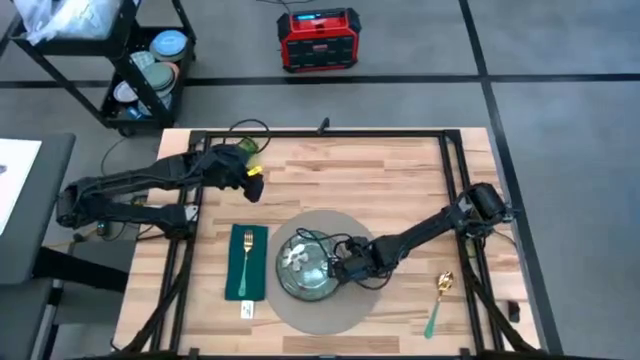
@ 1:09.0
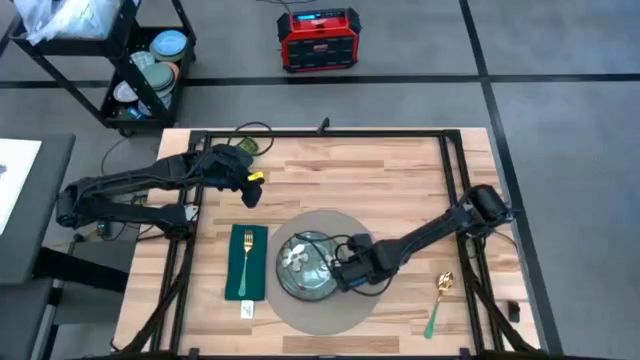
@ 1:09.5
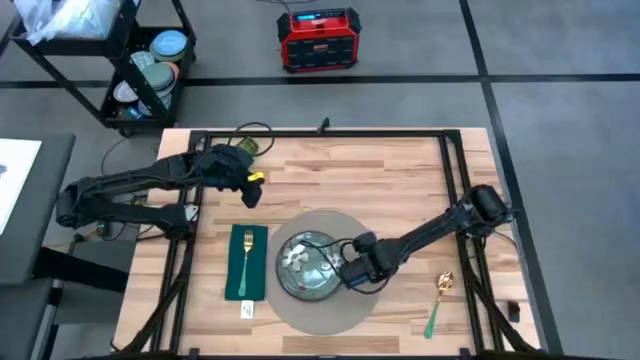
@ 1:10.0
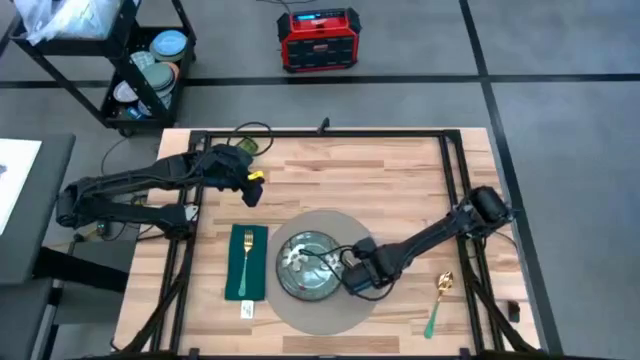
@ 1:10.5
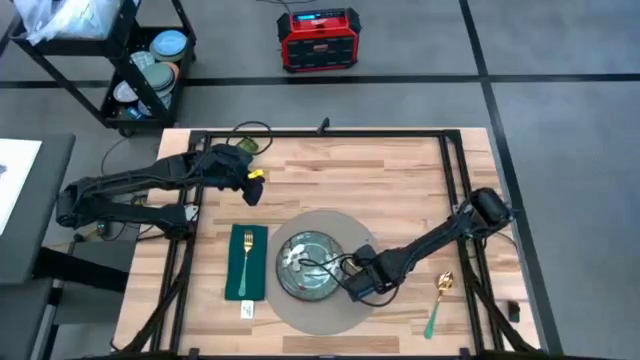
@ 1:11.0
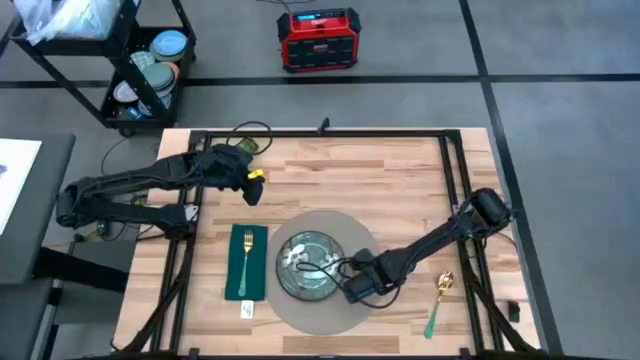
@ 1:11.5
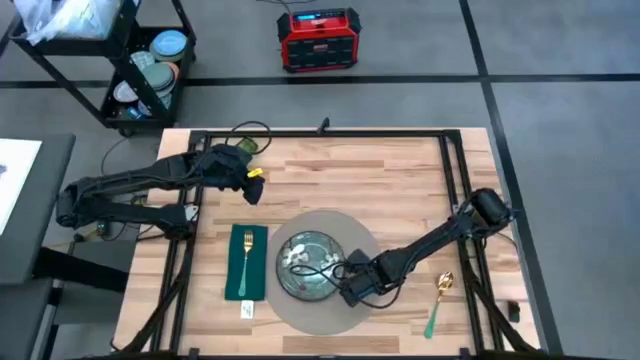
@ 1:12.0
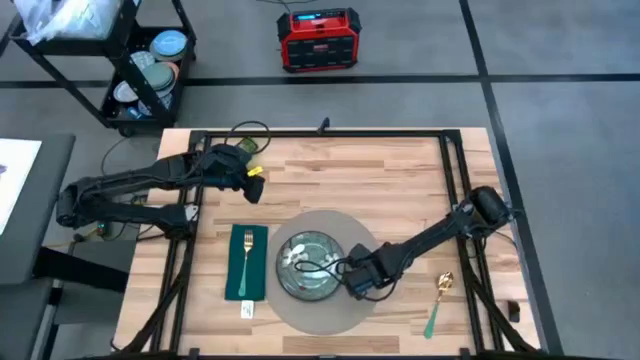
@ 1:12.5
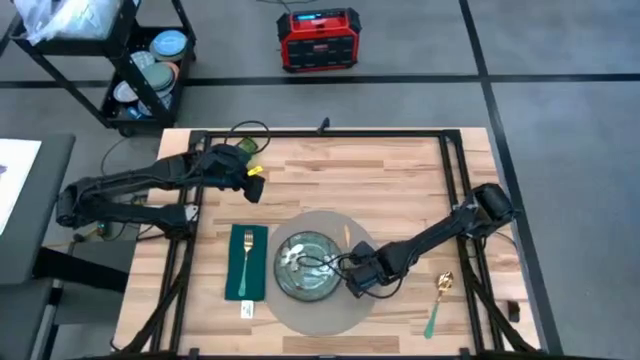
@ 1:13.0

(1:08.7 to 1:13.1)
Task: Set table place
Put the gold table knife on the gray tablemat to the right of the green plate

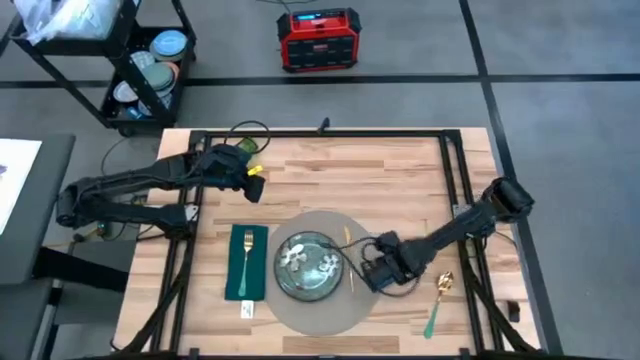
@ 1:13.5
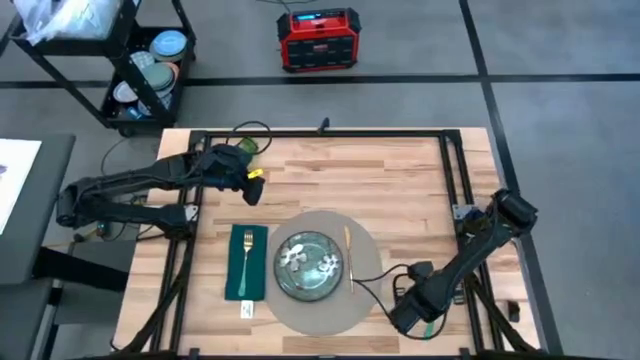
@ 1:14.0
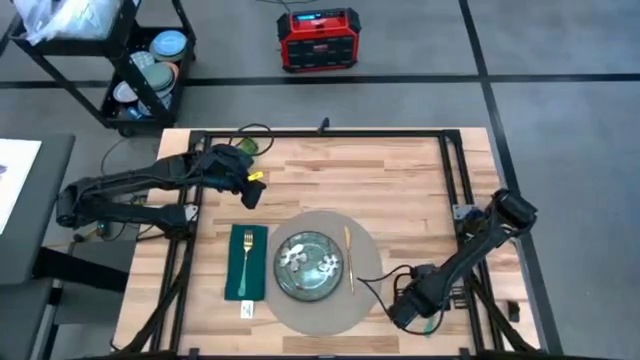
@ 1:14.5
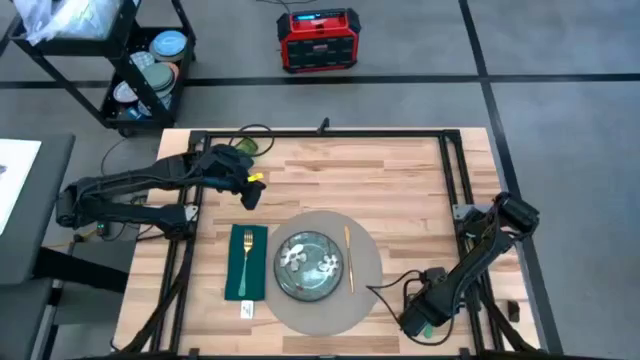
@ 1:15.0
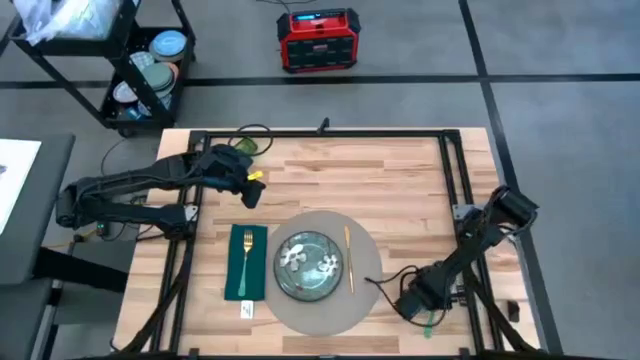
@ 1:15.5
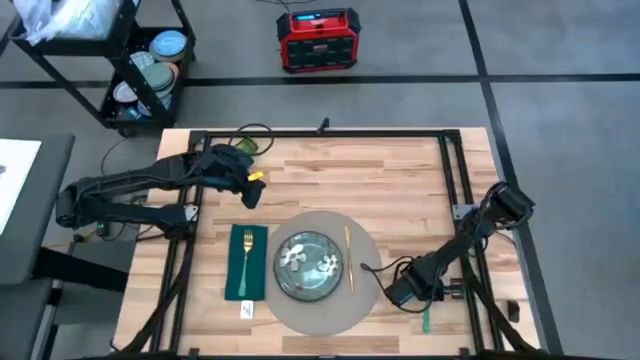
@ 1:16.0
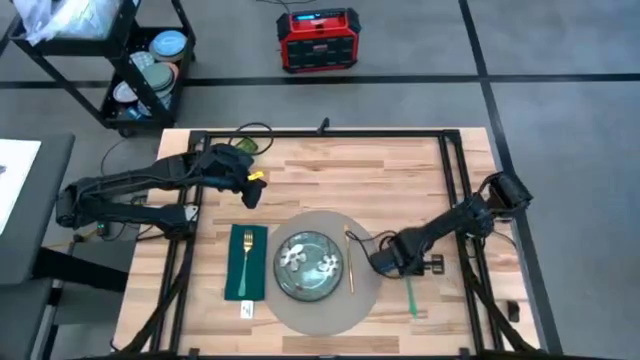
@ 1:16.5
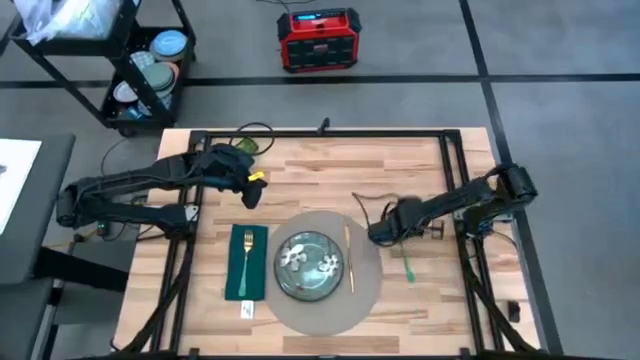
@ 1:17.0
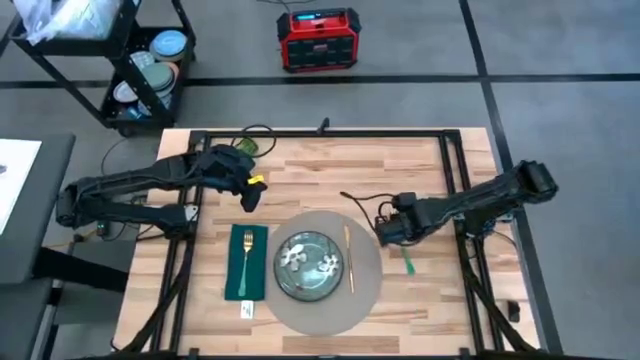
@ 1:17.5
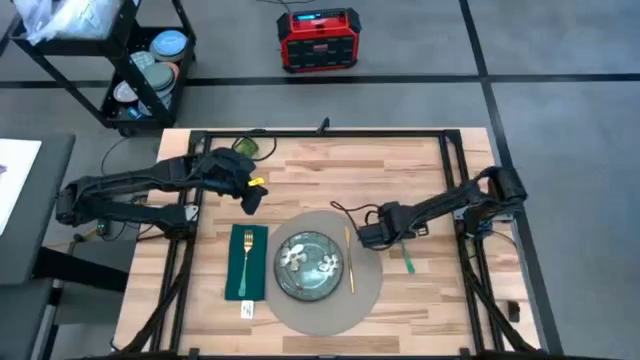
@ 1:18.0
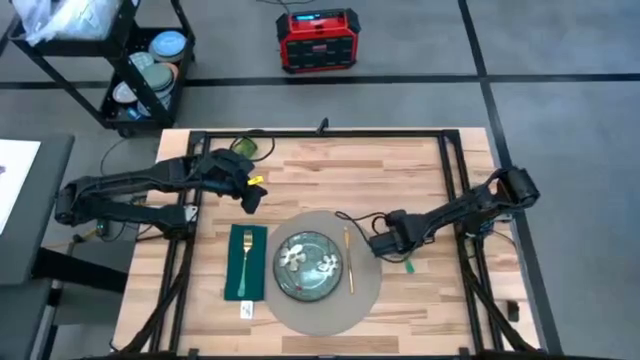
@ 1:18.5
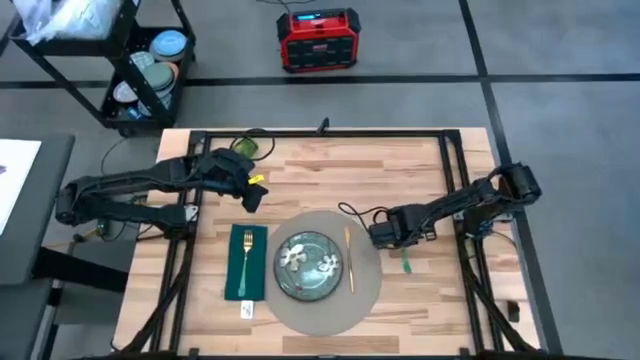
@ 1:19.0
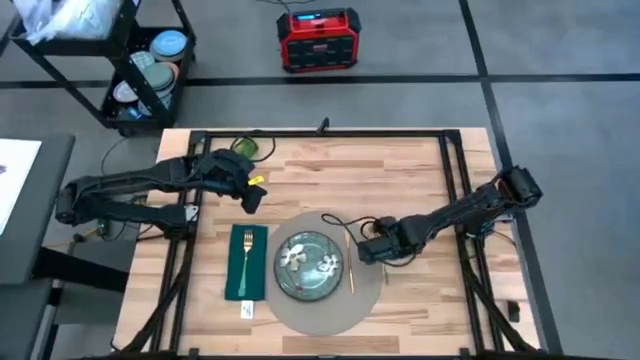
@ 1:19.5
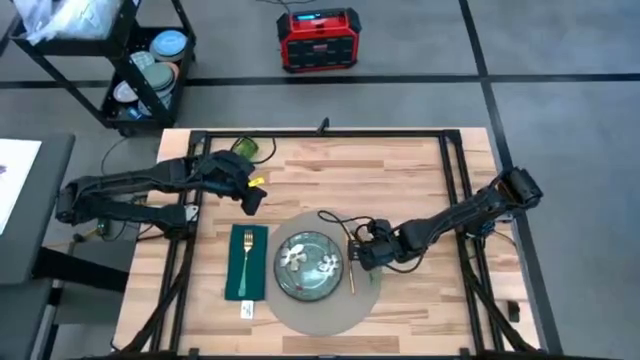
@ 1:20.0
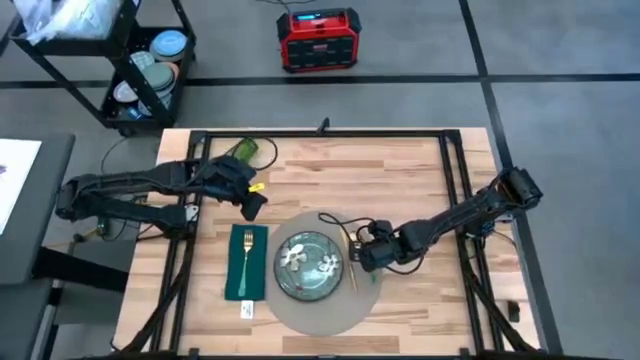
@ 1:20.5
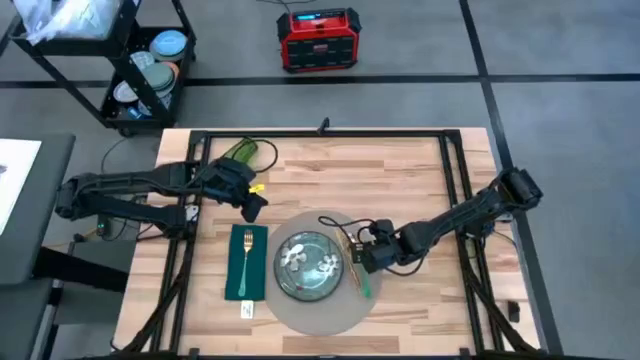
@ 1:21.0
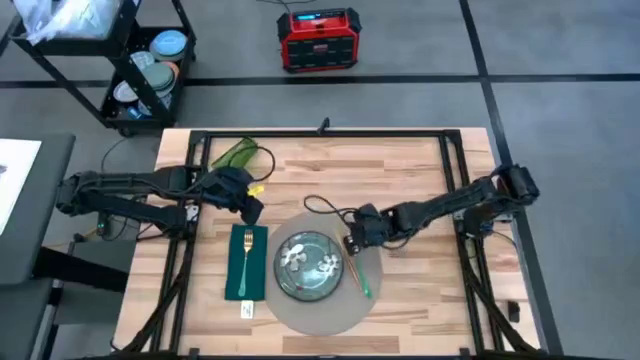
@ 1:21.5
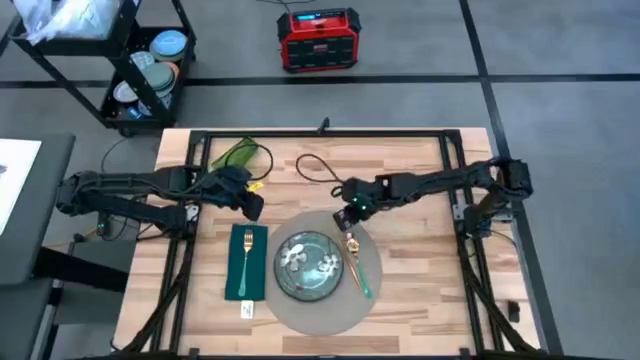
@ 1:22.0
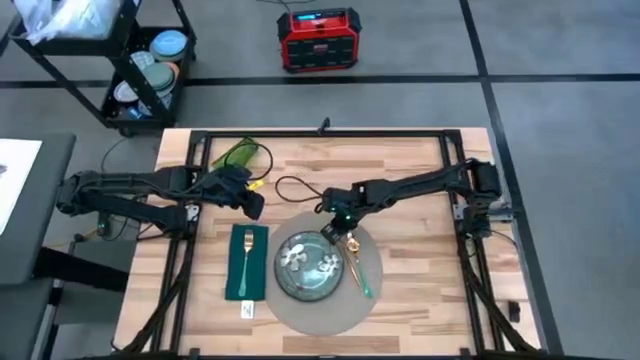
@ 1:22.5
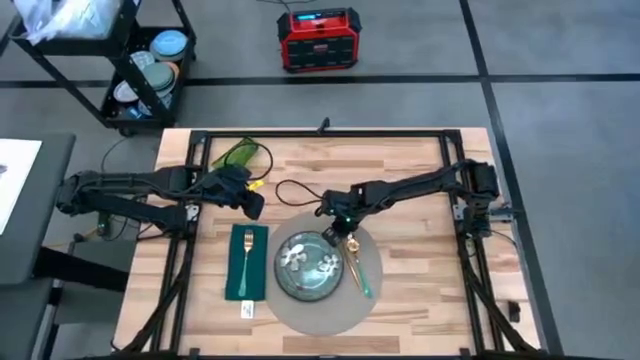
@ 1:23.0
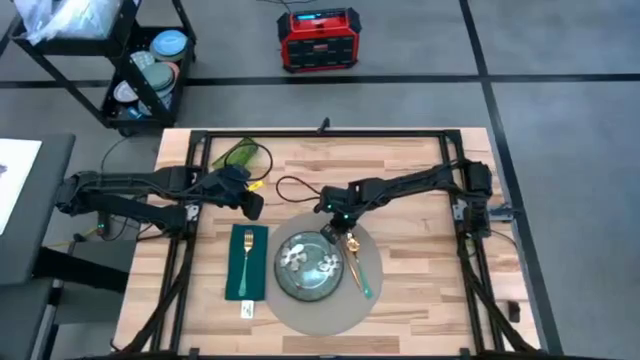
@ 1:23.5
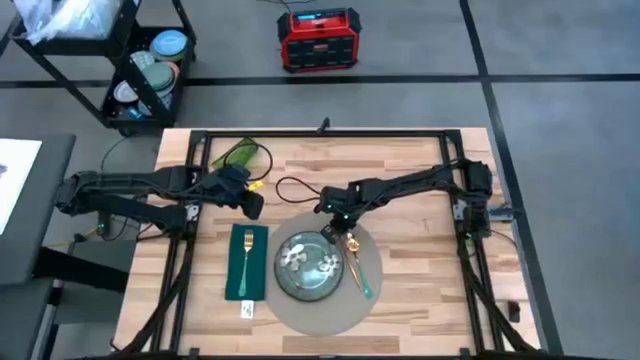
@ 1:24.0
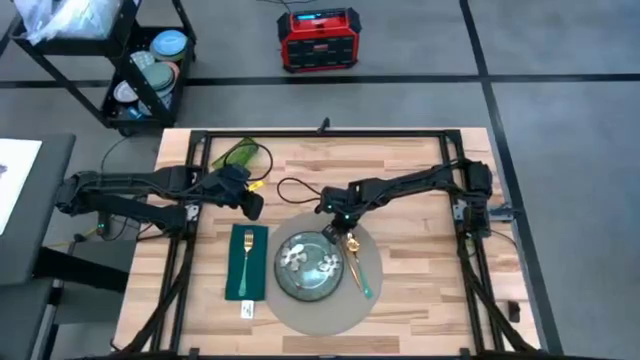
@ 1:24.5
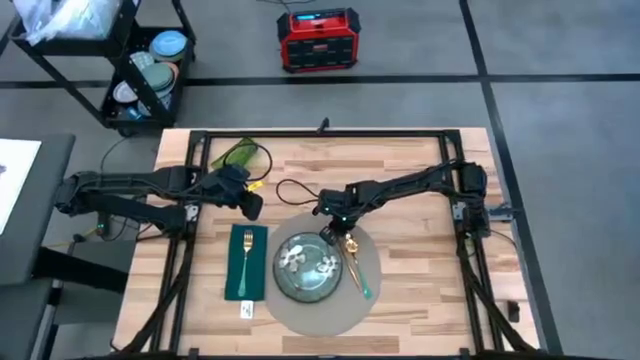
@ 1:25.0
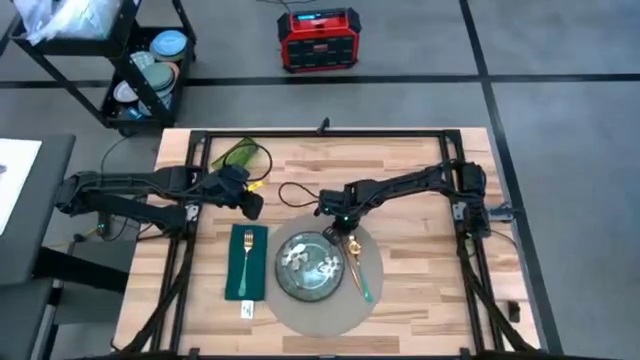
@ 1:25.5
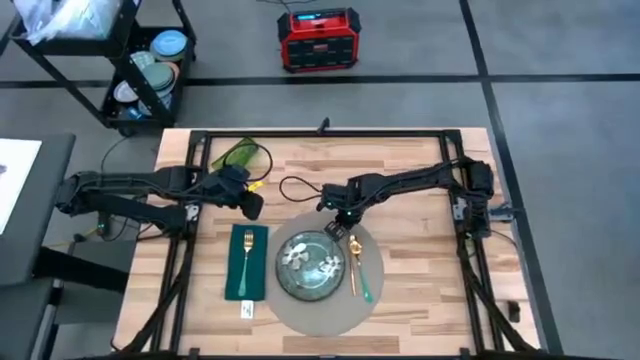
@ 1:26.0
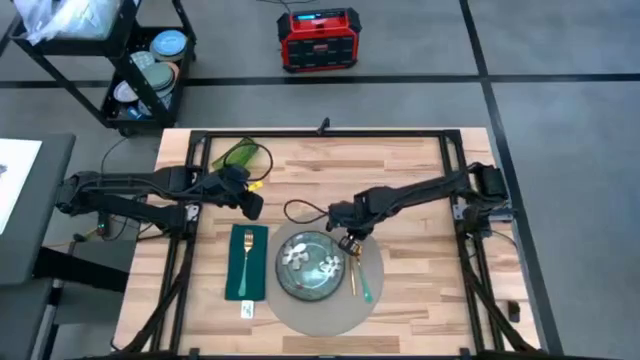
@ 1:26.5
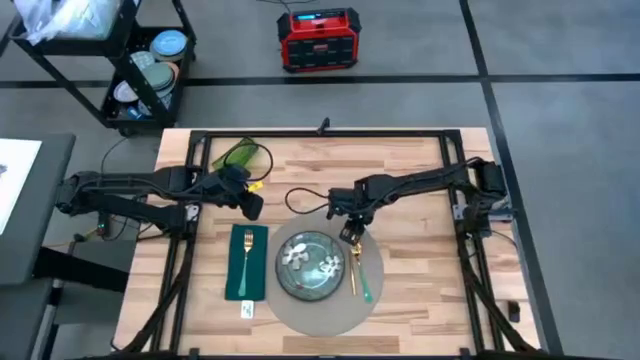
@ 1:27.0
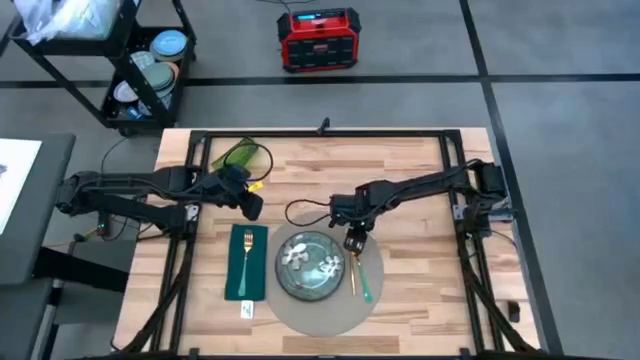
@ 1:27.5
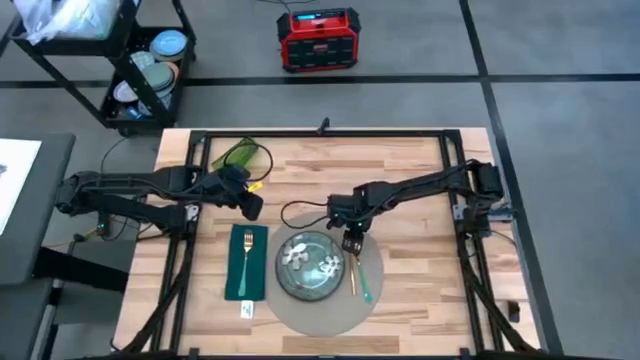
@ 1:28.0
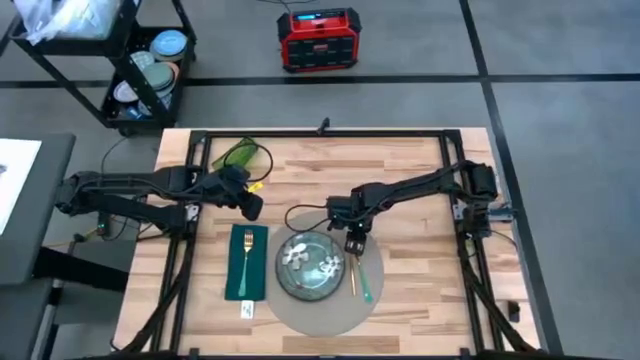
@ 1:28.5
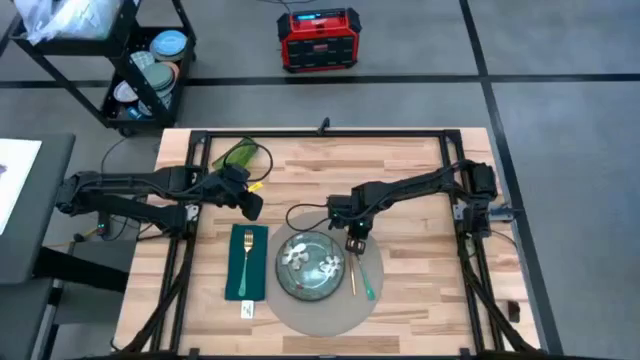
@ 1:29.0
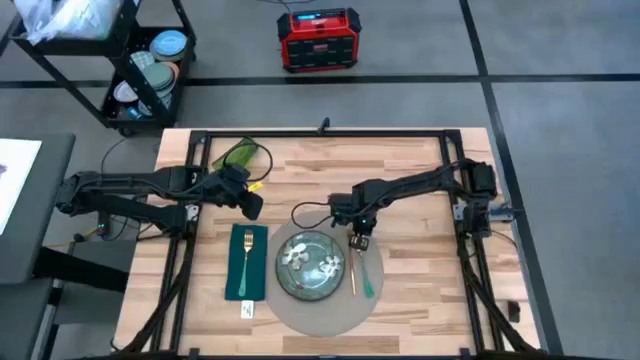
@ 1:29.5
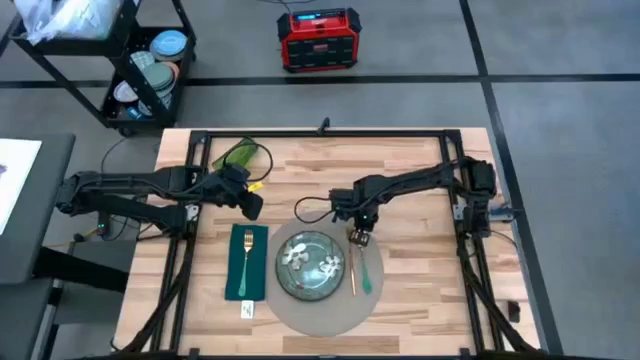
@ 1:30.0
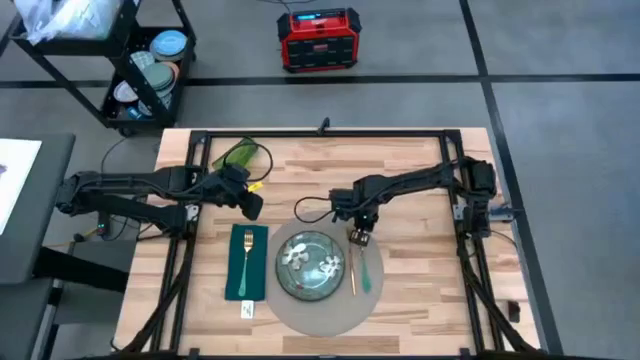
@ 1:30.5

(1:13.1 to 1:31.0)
Put the green spoon on the gray tablemat to the right of the gold table knife
